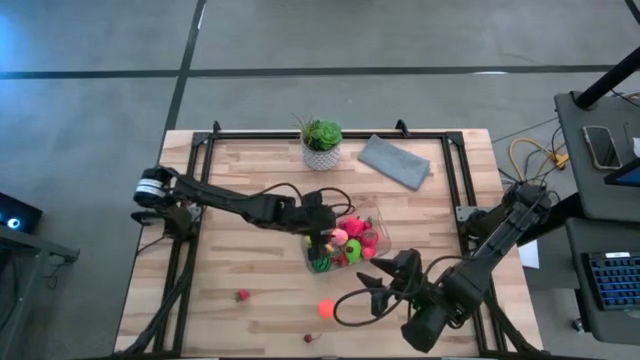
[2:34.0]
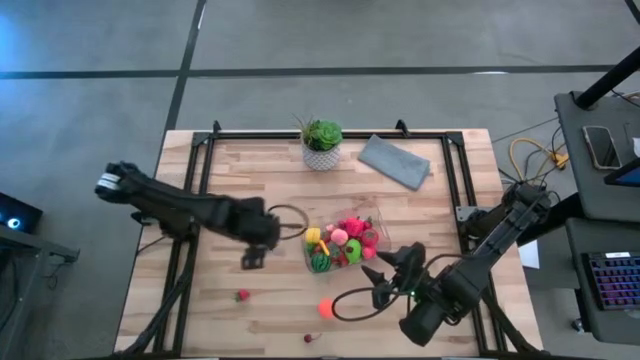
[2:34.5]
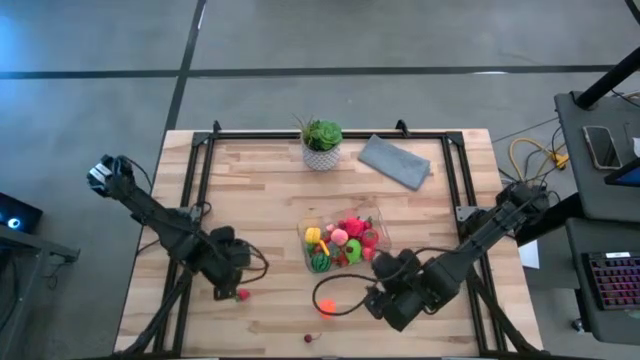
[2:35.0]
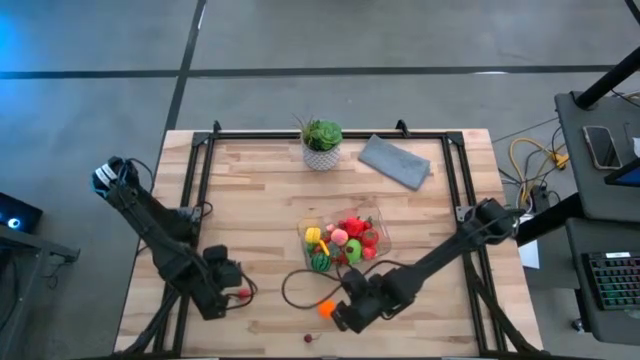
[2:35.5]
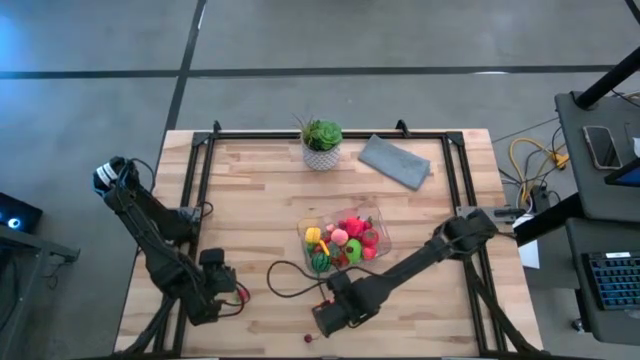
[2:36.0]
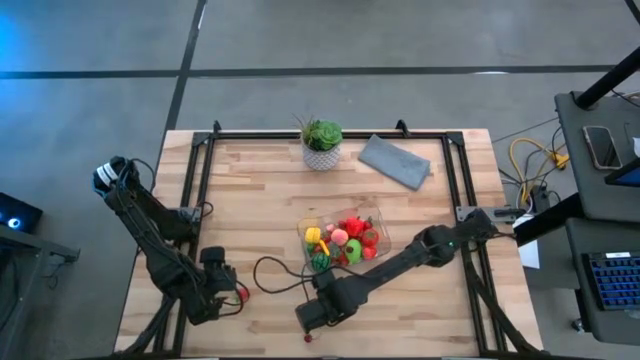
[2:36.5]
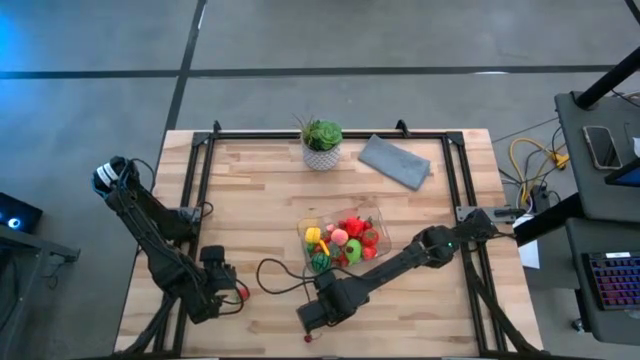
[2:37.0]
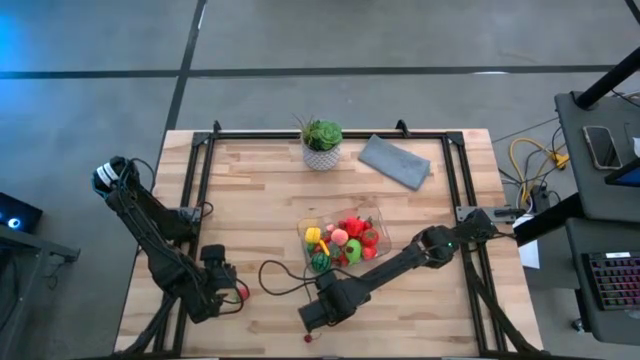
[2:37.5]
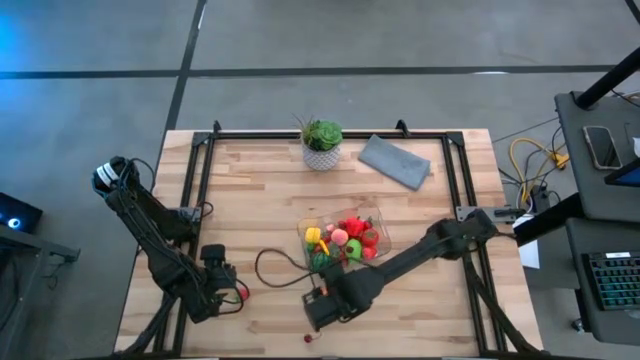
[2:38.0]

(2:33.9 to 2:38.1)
Task: Pick and placing Produce into tupperware
Put the tangerine into the transparent bin

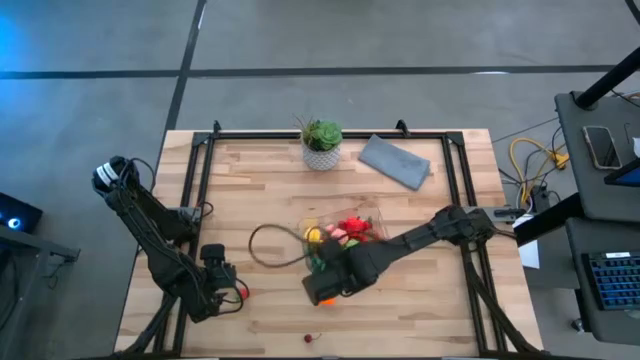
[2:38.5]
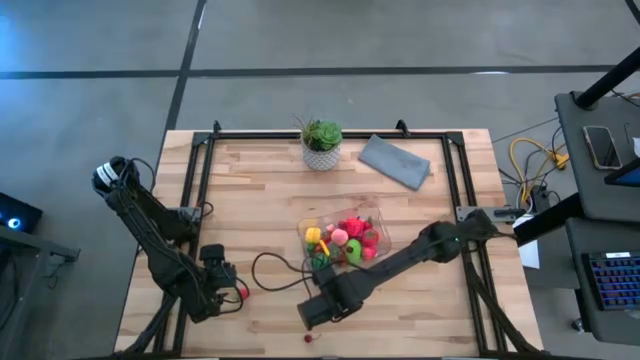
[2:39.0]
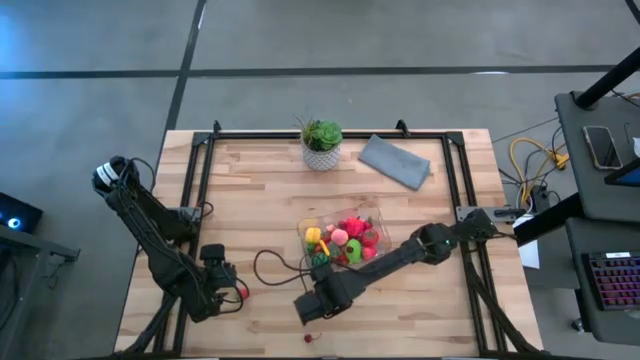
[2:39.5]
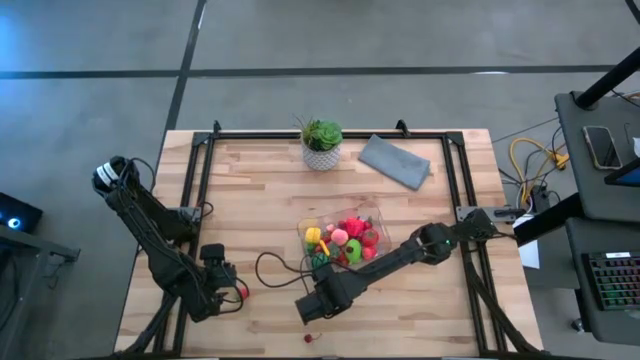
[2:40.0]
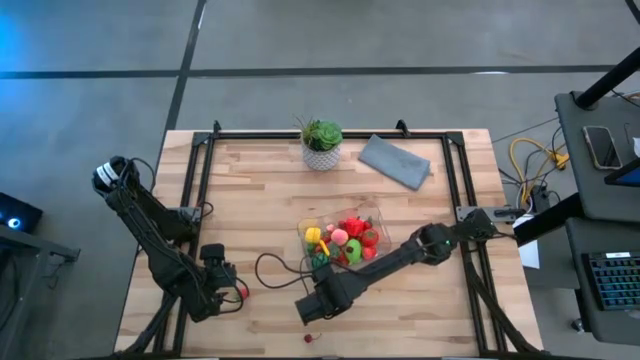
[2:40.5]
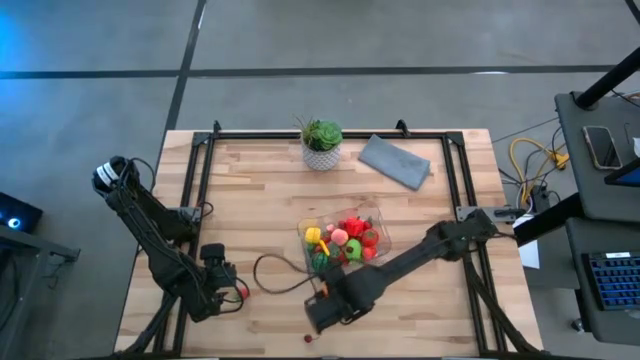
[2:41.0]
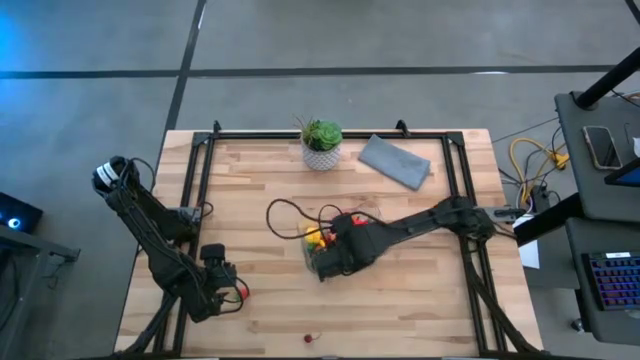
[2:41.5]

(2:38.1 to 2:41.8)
Put the tangerine into the transparent bin

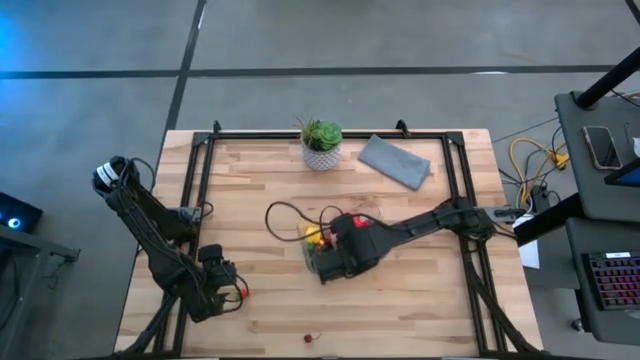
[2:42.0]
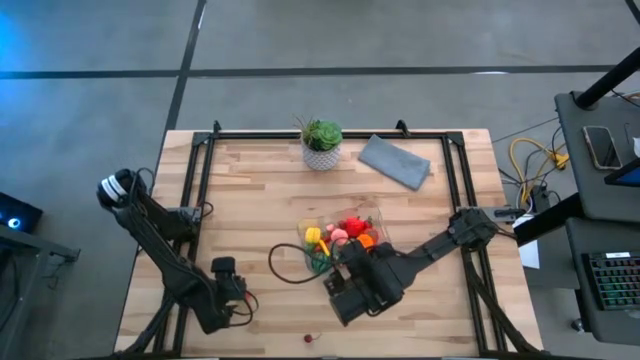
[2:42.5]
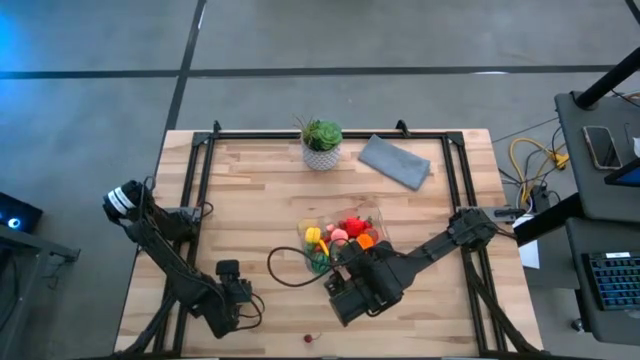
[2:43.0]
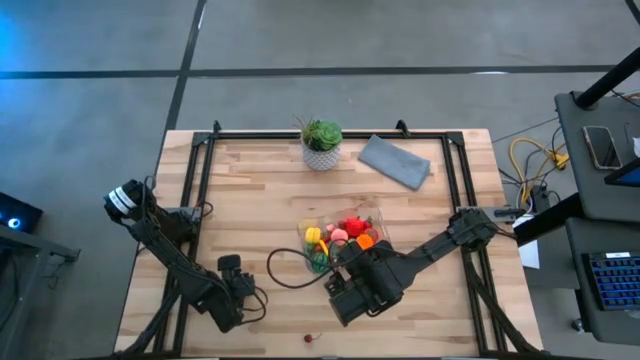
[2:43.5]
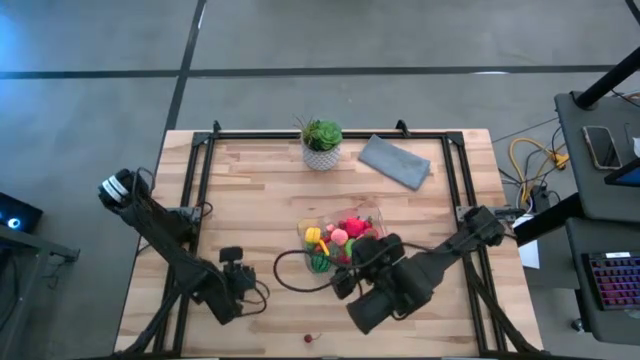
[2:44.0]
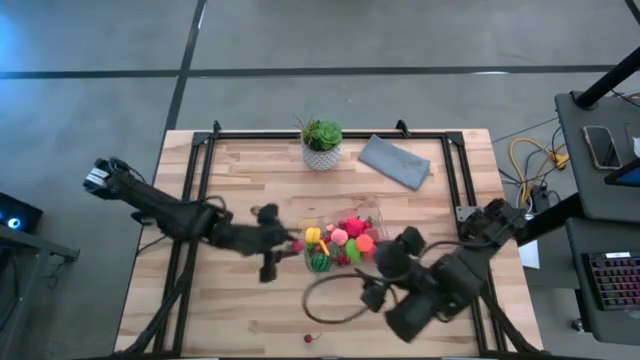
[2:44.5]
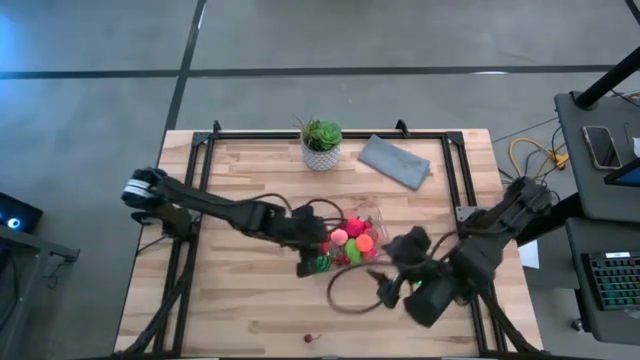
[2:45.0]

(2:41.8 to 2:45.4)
Put the strawberry into the transparent bin

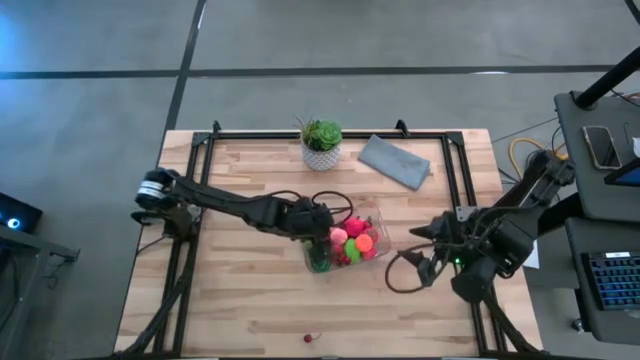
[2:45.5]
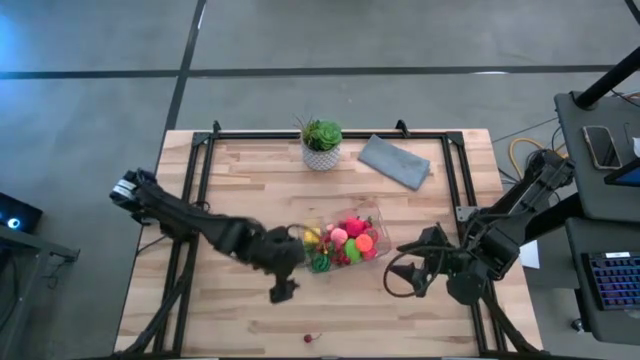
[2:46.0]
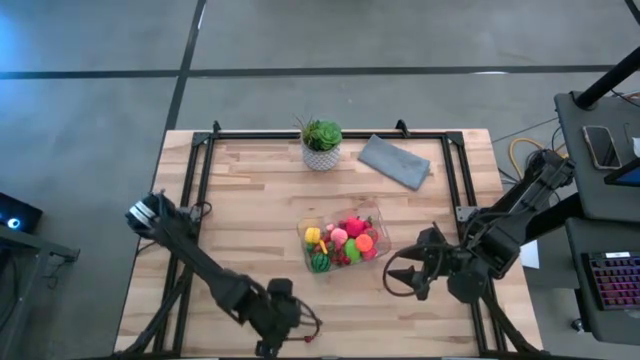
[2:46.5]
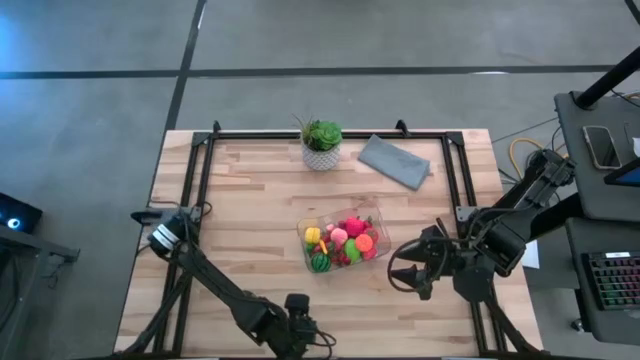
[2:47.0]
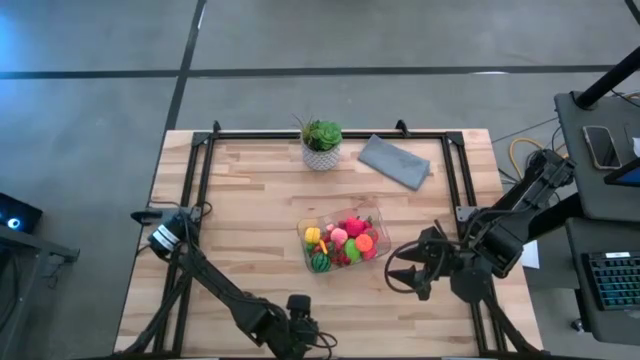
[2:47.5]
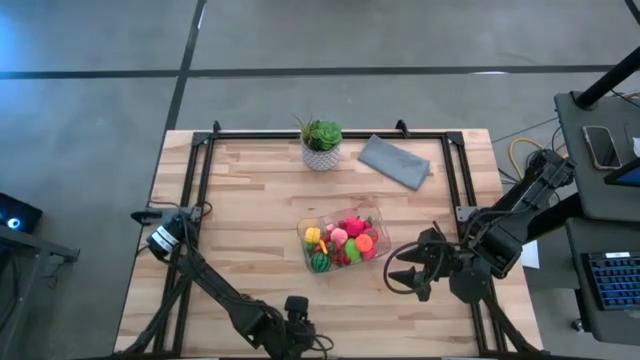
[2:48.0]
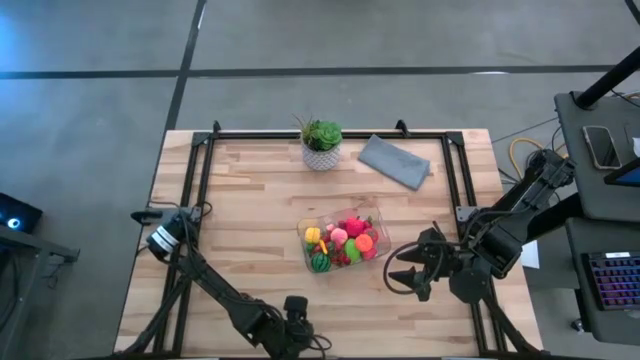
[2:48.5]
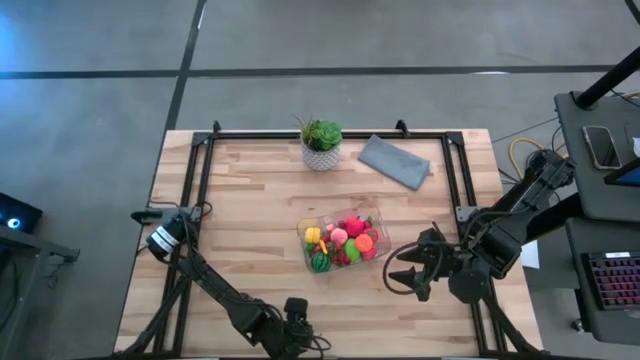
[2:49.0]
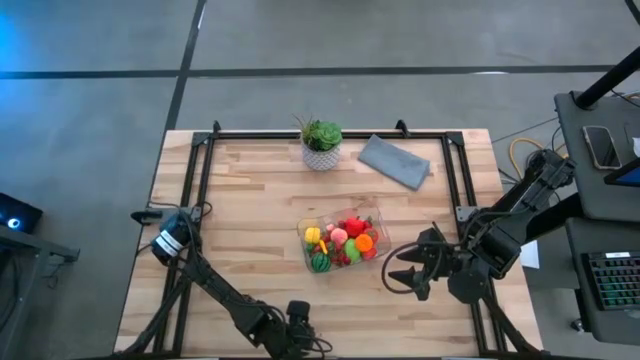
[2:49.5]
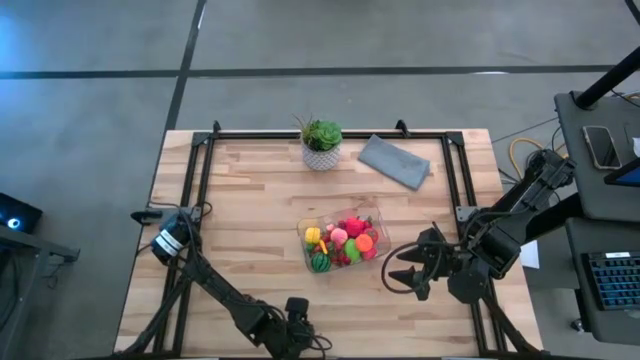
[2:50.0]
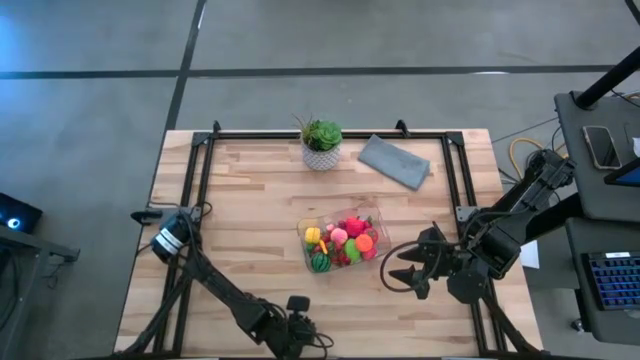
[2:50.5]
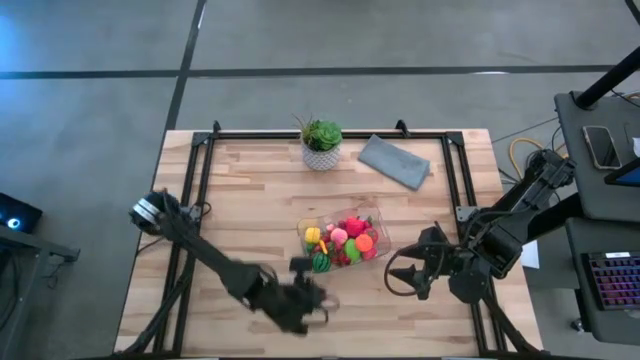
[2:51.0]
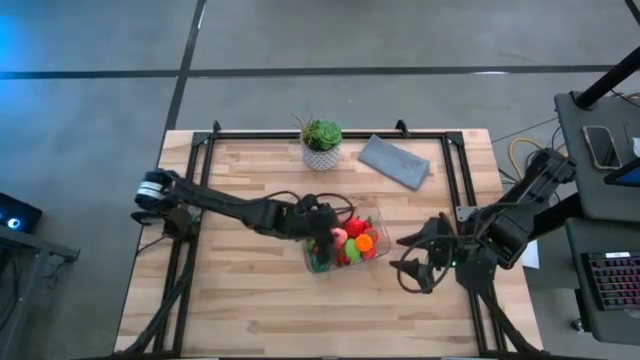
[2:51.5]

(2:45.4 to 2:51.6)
Put the cherry into the transparent bin

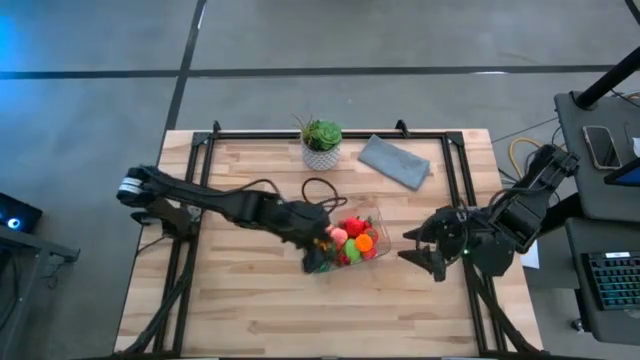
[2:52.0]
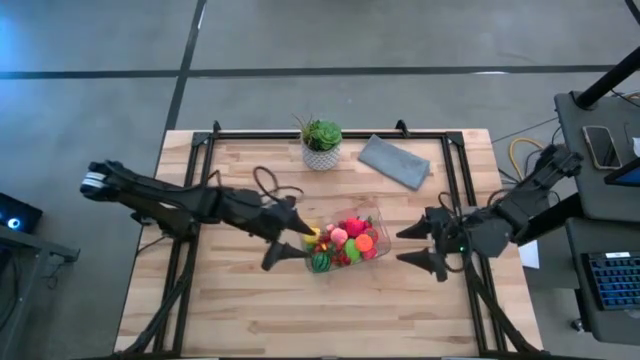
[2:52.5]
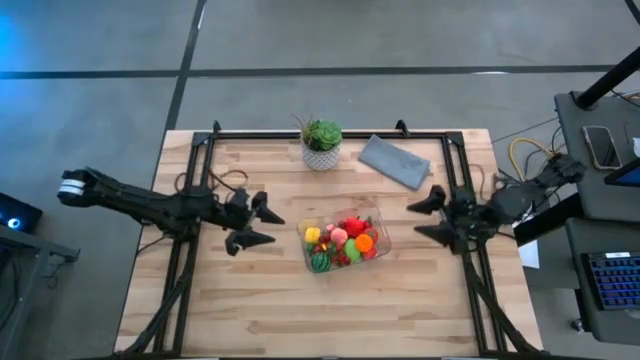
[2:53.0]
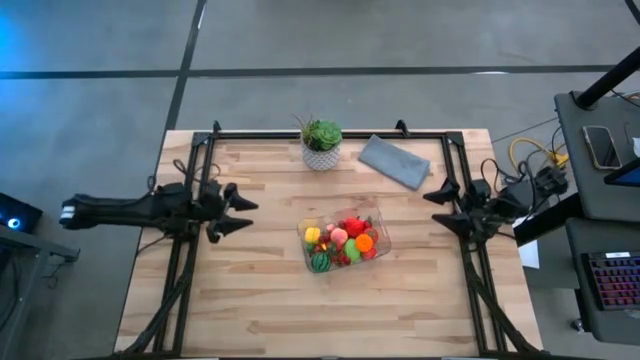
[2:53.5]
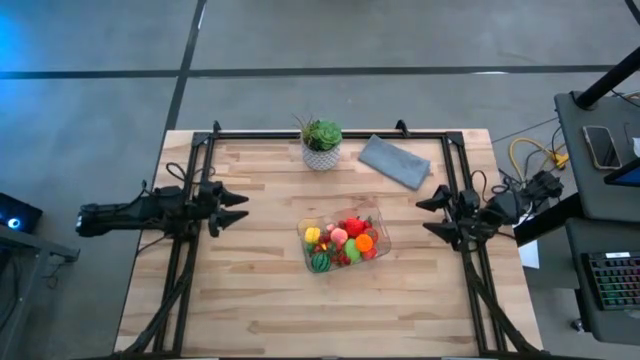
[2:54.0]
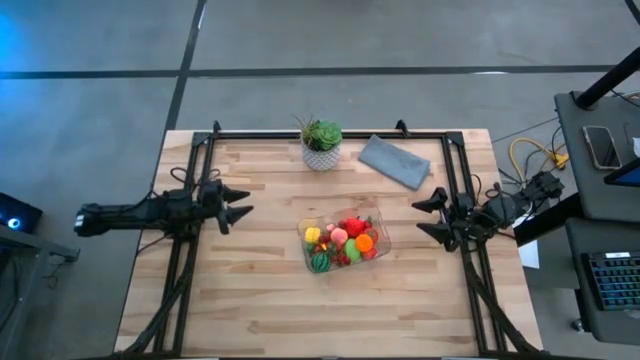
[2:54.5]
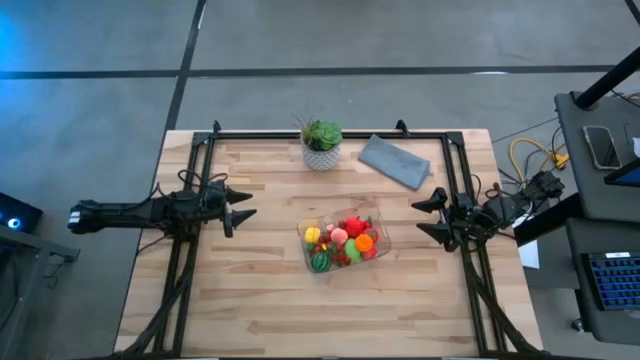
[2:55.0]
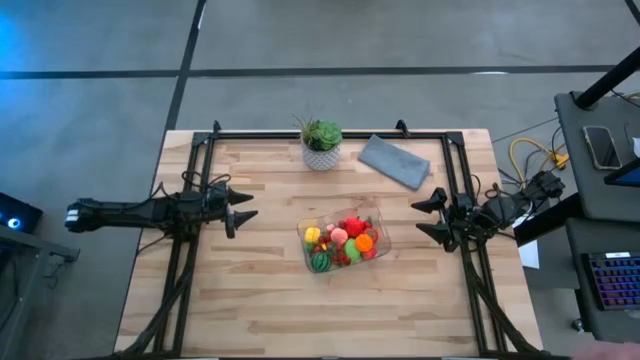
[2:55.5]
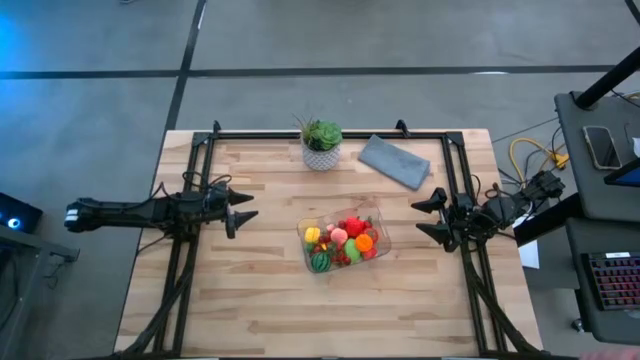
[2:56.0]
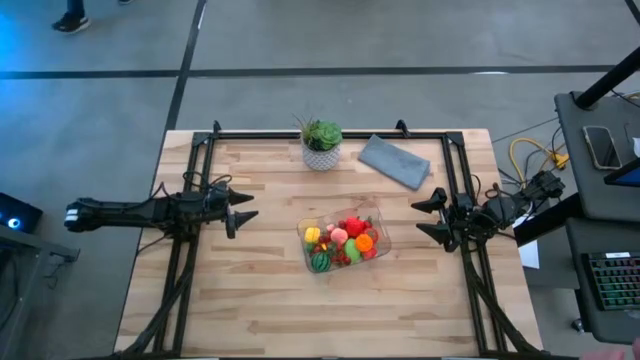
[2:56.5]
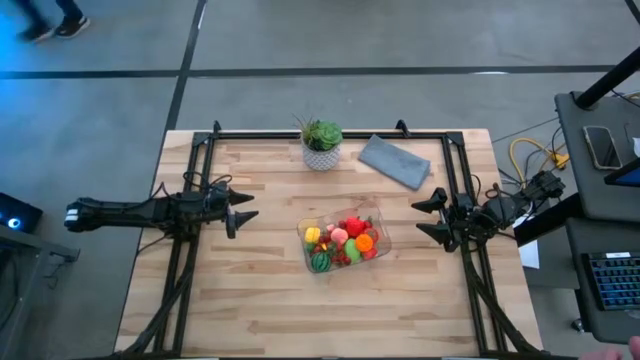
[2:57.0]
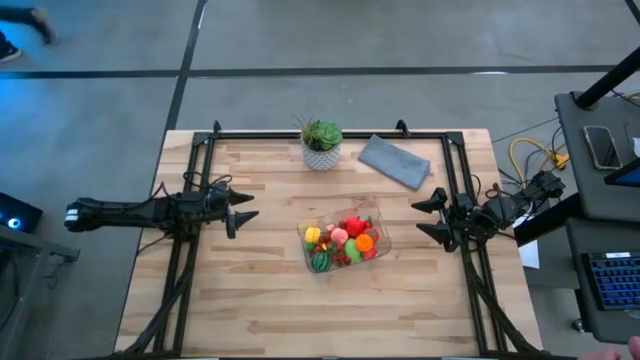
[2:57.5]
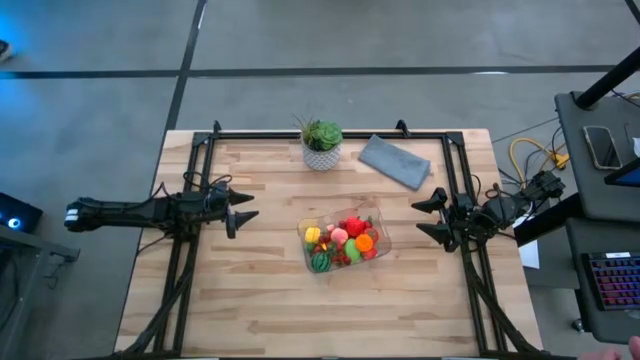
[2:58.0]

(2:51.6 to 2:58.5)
Return to Home Position
